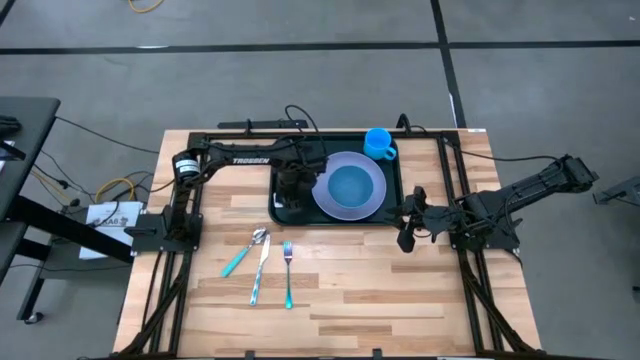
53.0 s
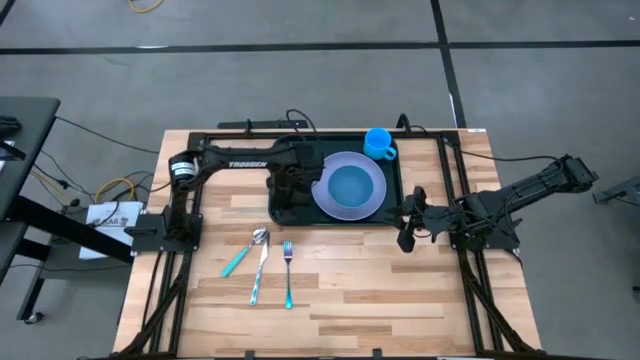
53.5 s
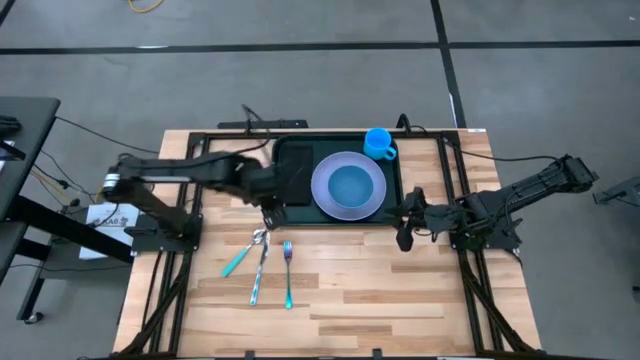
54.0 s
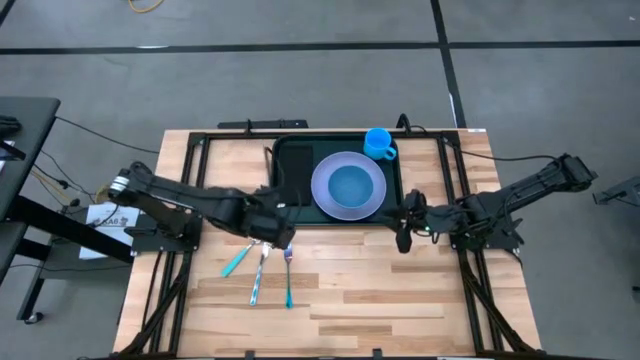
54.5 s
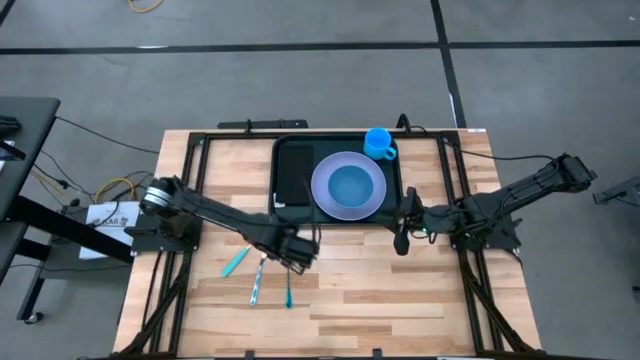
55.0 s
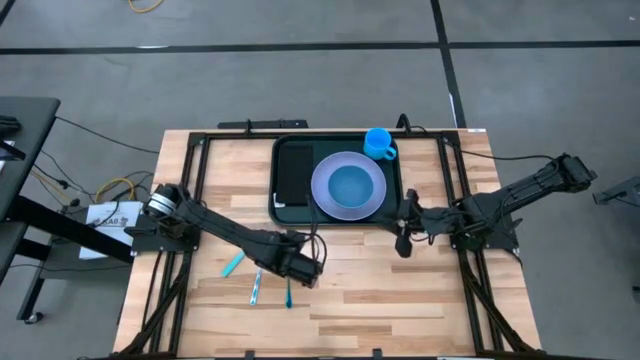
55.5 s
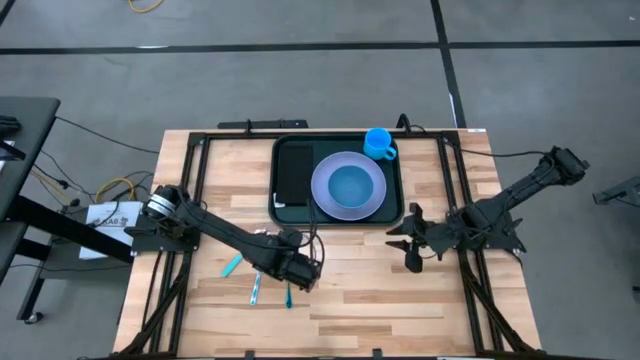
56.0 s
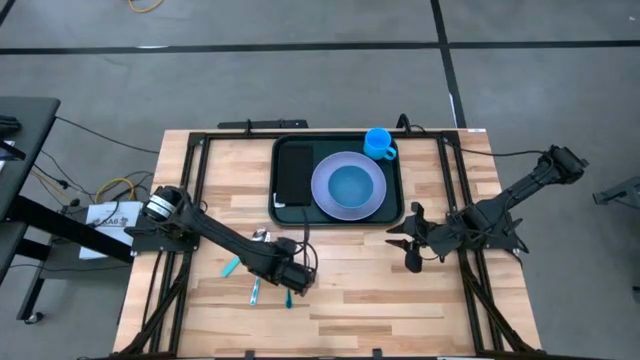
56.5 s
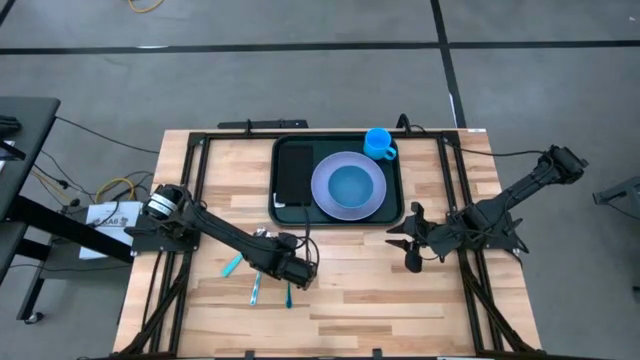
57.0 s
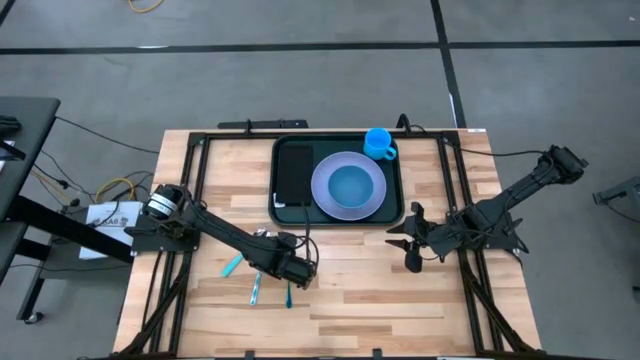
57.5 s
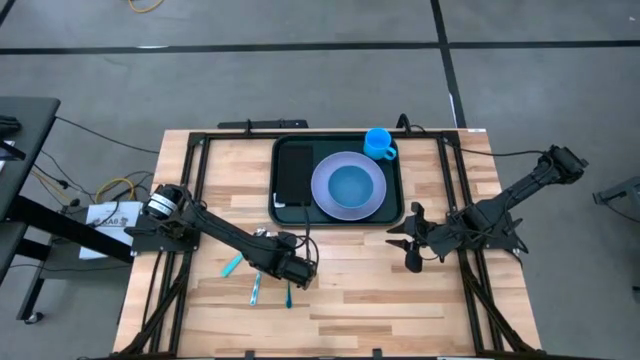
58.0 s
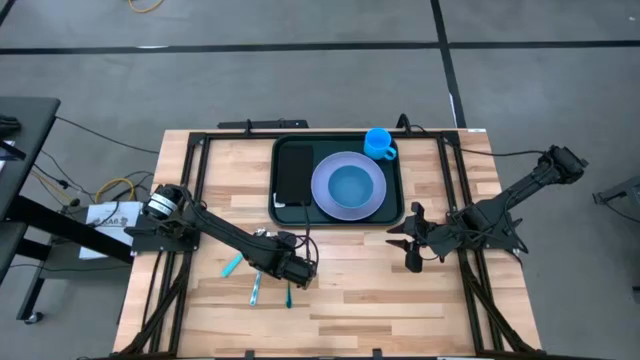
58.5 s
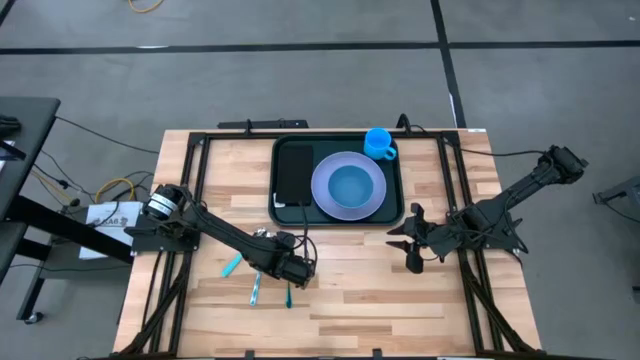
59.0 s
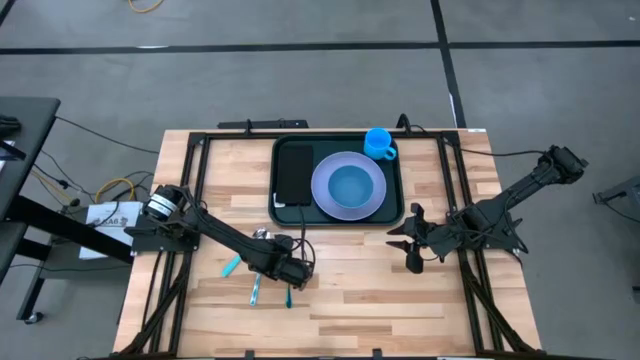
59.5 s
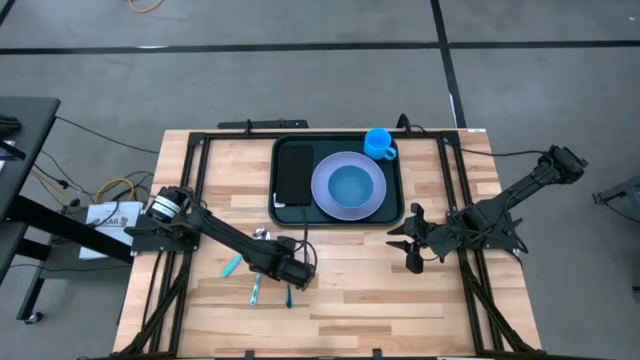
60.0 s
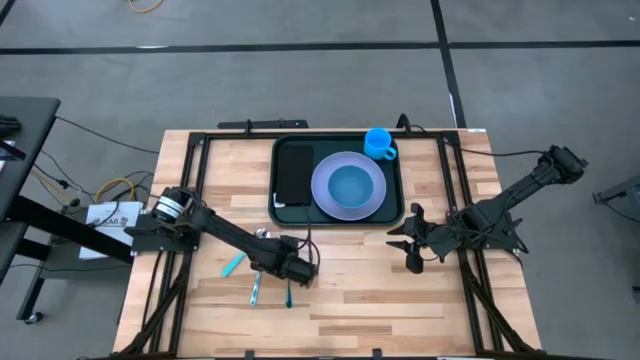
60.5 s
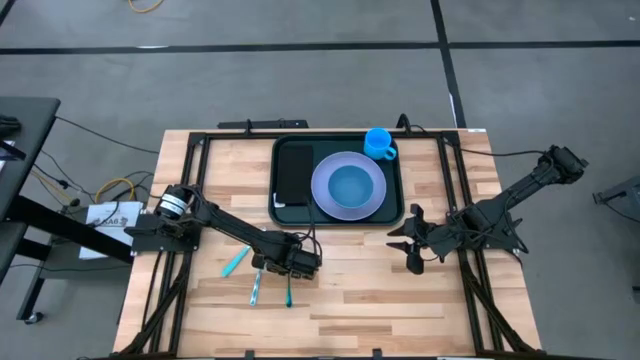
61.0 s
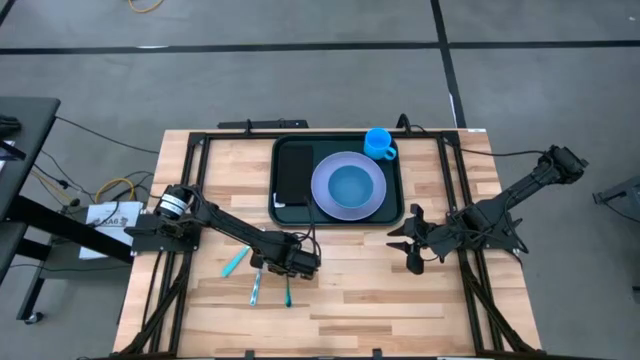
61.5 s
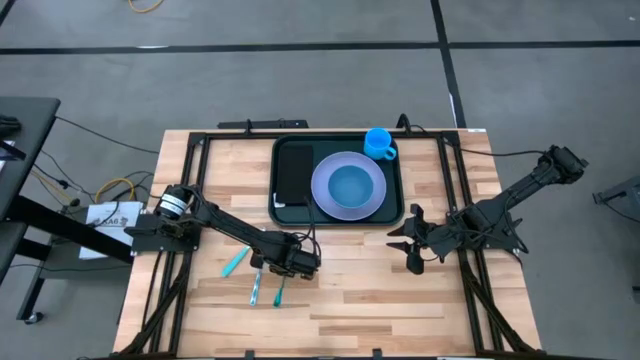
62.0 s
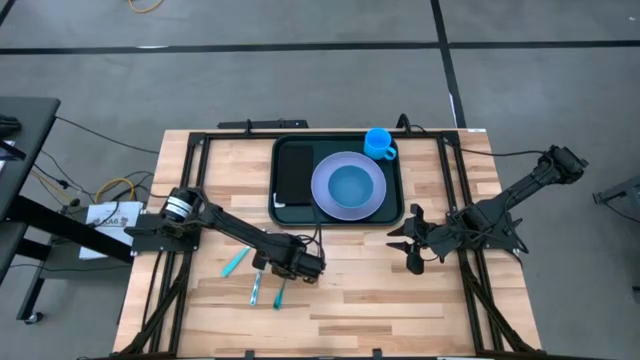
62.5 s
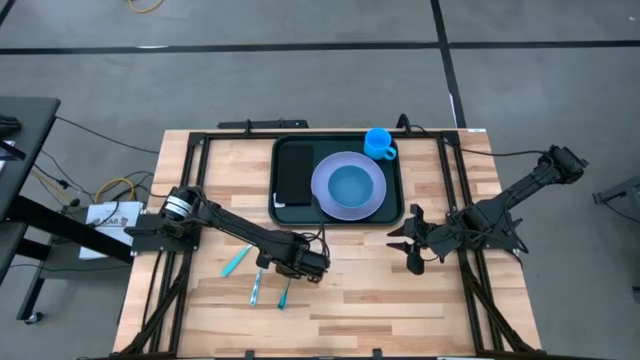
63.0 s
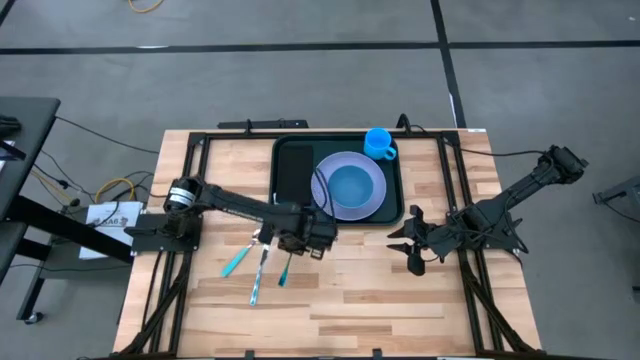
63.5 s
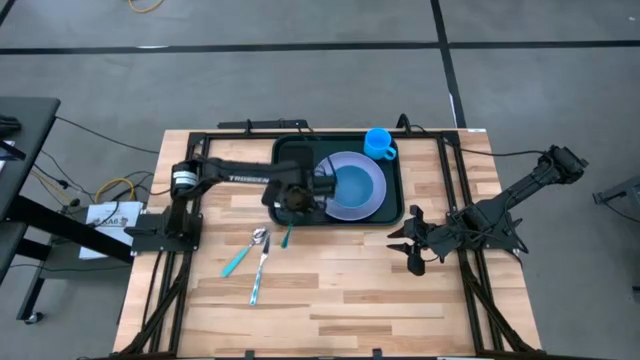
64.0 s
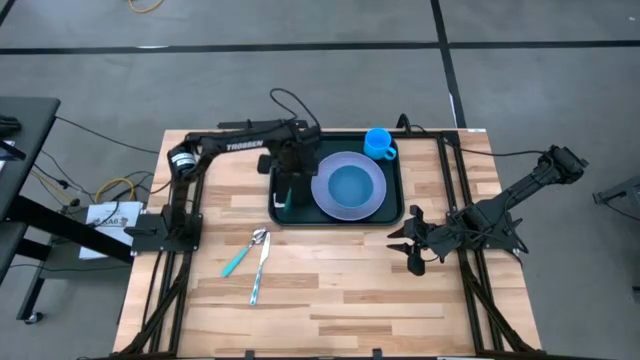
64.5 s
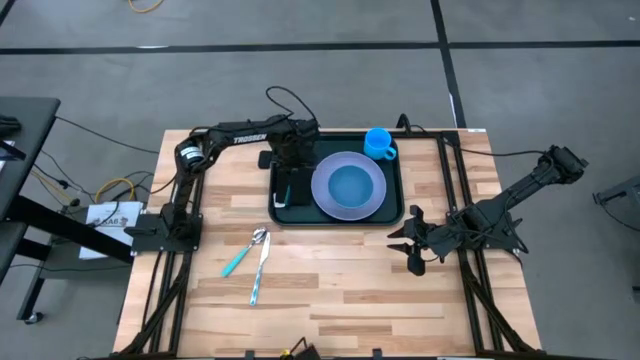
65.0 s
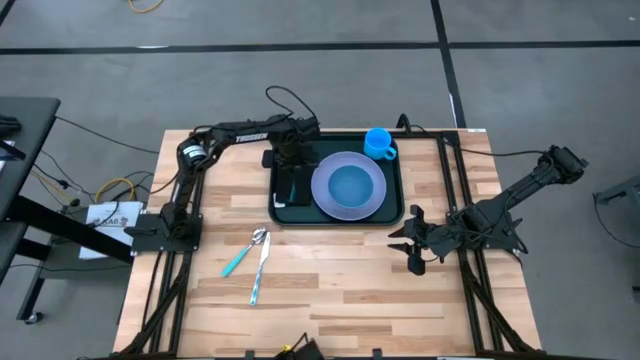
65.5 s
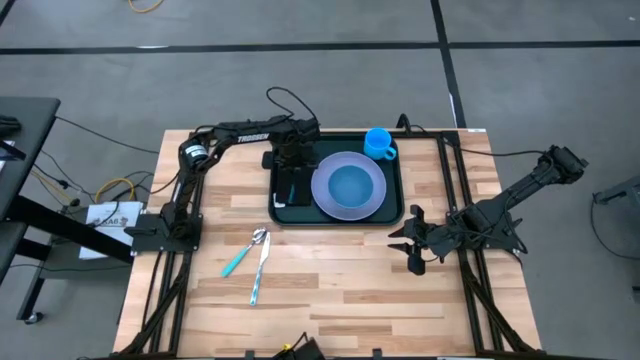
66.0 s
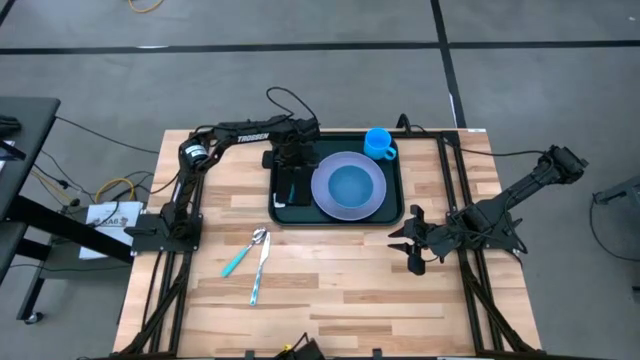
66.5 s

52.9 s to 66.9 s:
Task: Set up tray
Put the blue fork on top of the black napkin

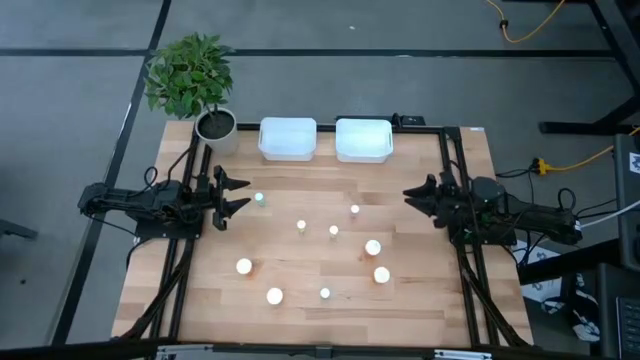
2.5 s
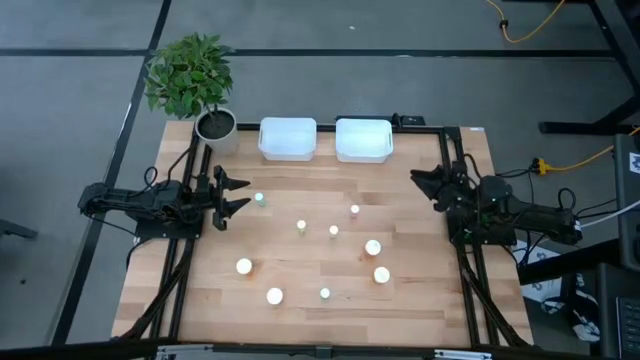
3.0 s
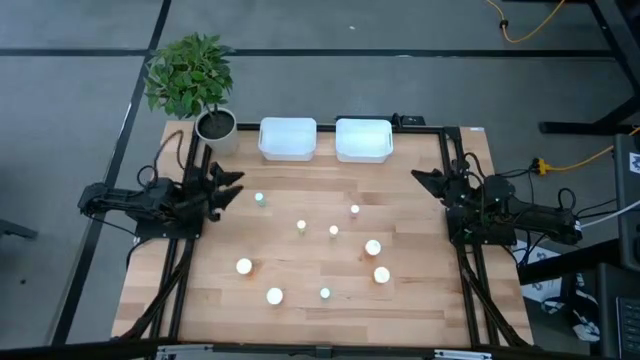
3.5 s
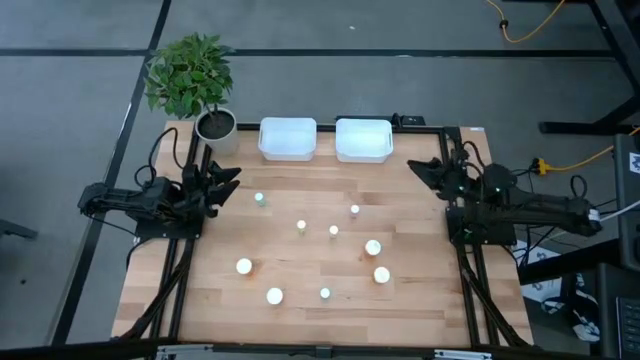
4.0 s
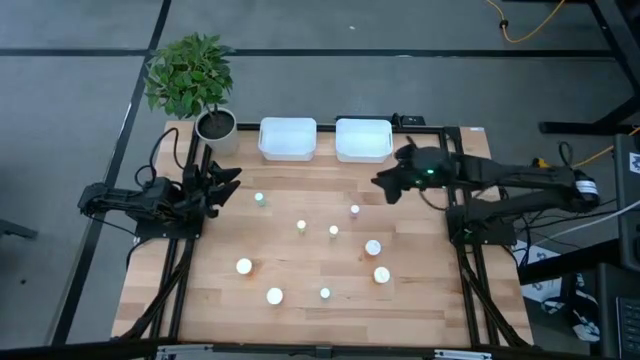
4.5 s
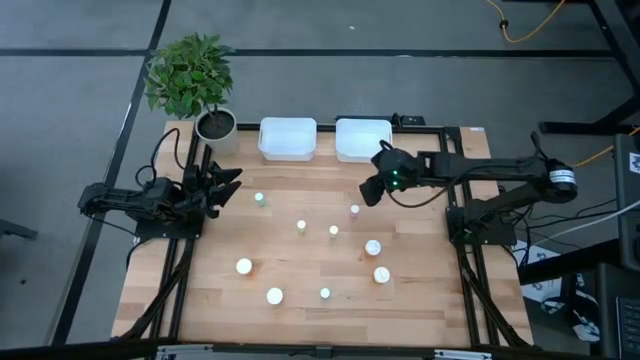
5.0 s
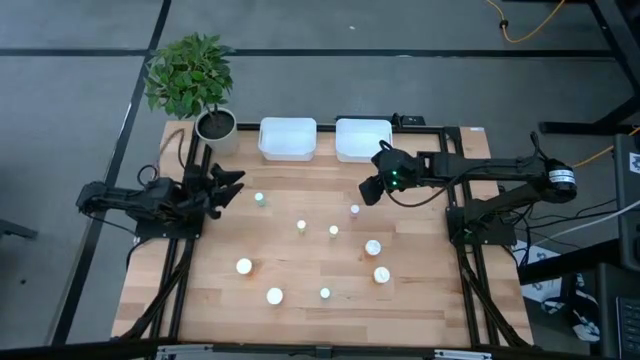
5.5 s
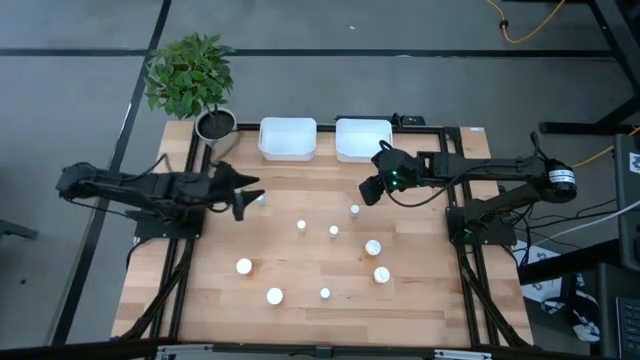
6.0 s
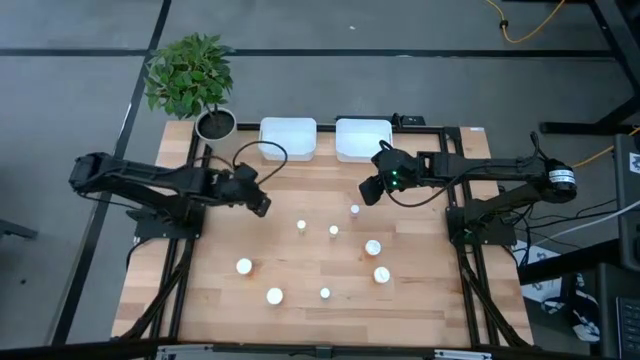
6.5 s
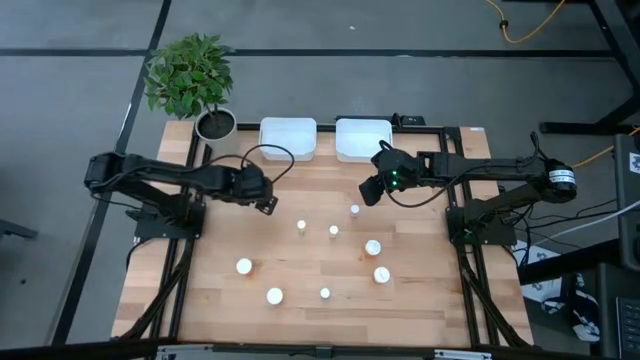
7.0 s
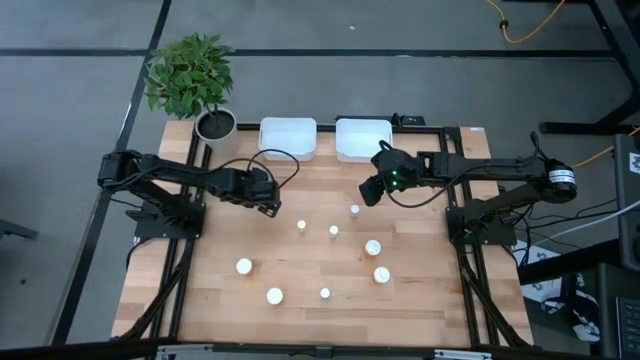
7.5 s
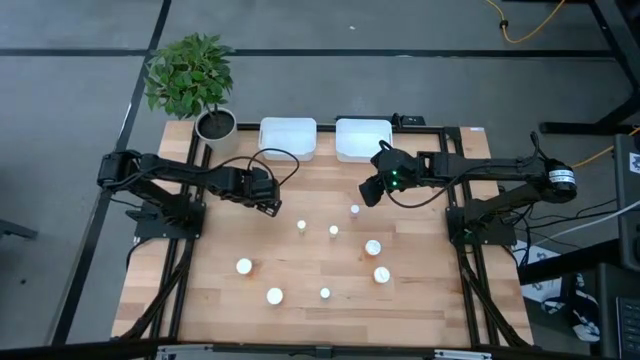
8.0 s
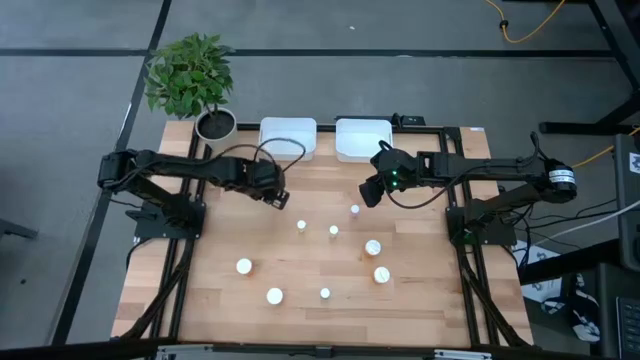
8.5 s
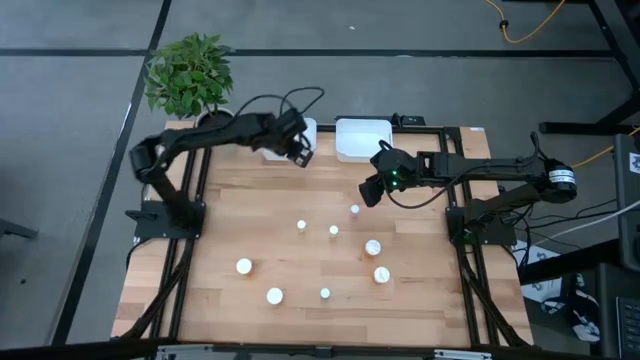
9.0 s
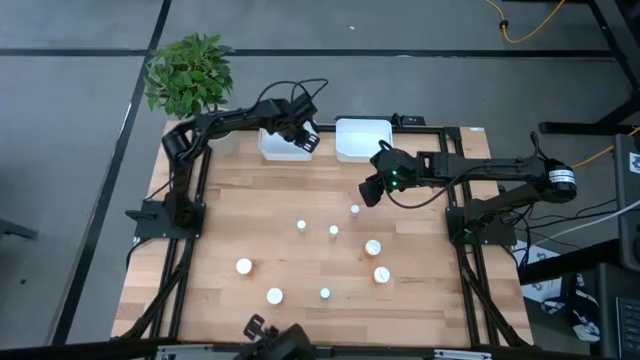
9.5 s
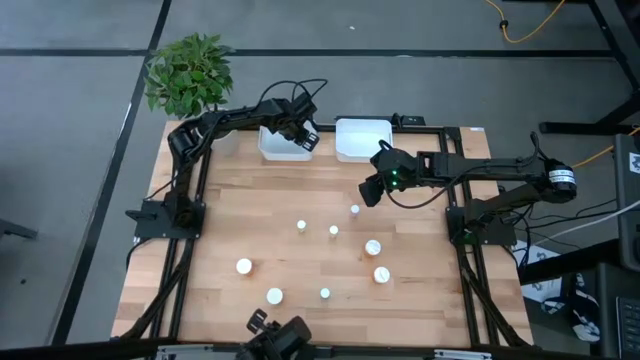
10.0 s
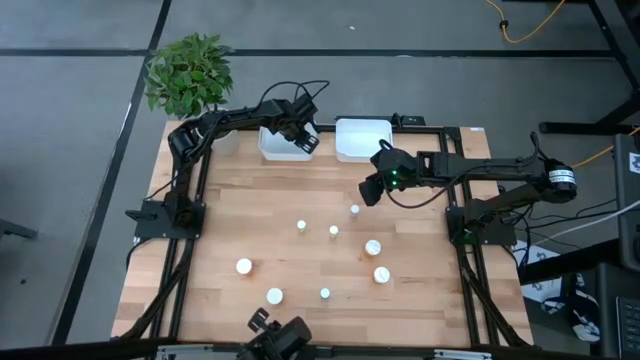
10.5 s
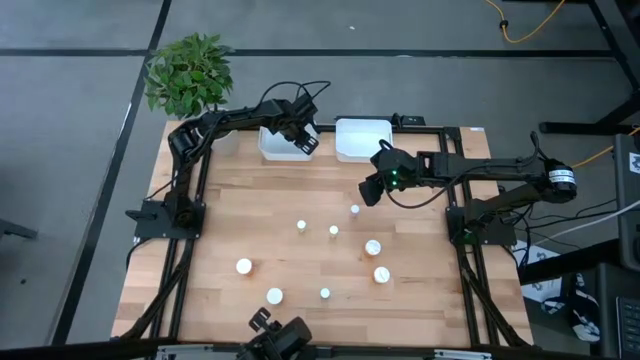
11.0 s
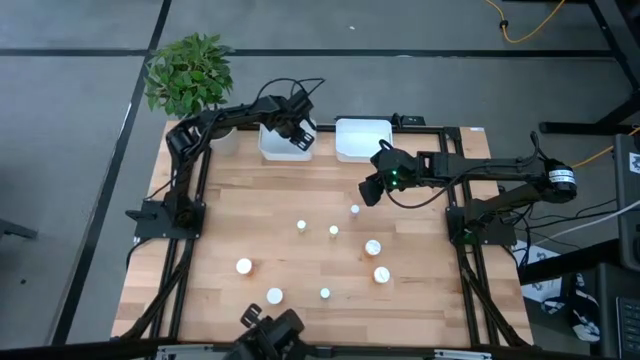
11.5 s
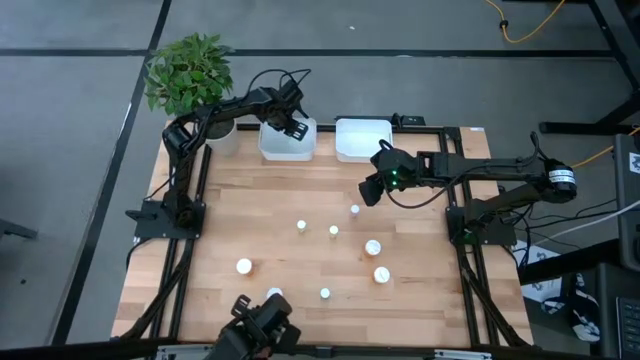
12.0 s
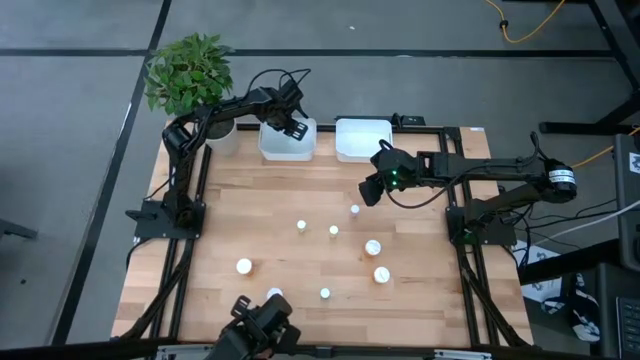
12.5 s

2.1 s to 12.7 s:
Task: Pick and place medicine bottles into bin by pill shape (circle, oval)
Put the top blue tablet bottle into the left white bin
